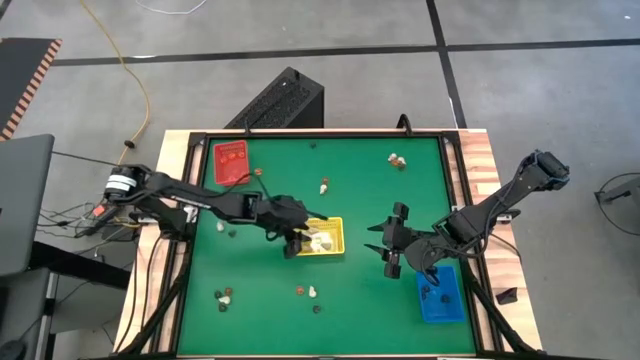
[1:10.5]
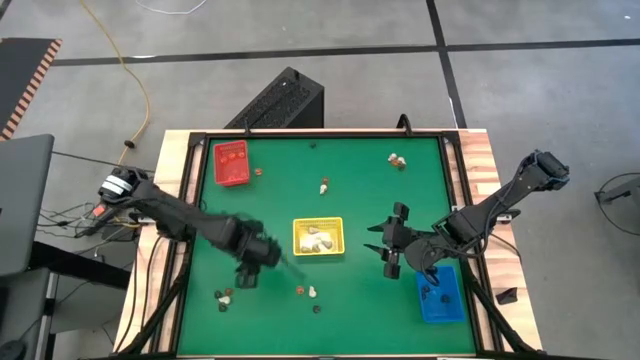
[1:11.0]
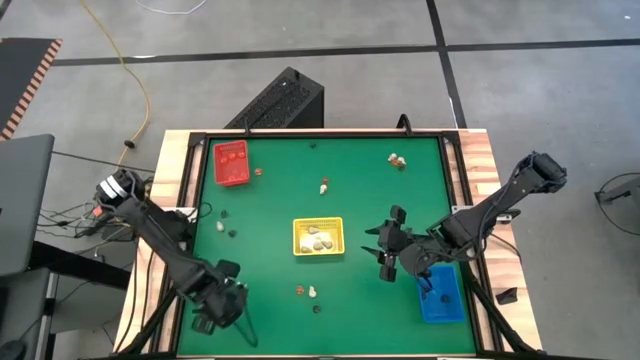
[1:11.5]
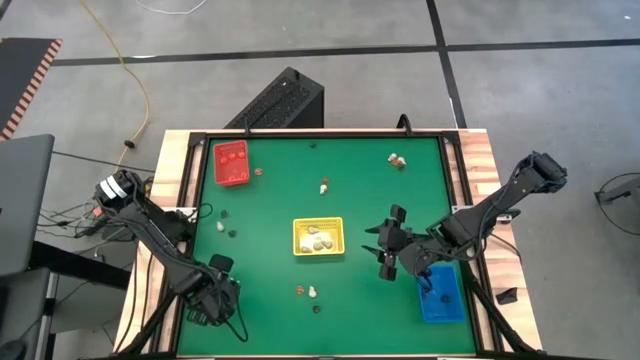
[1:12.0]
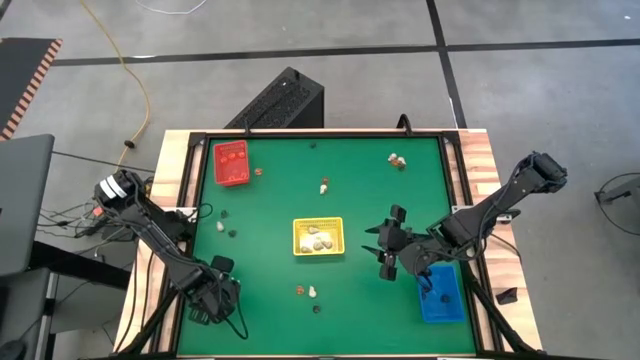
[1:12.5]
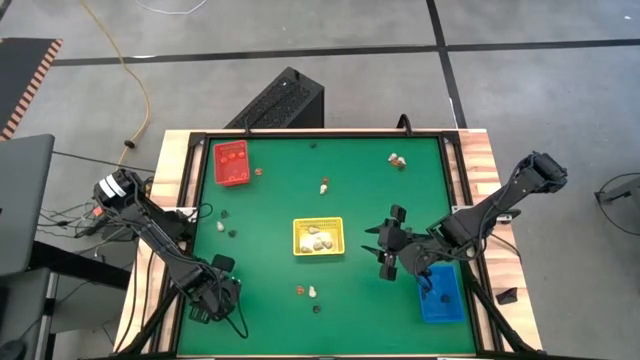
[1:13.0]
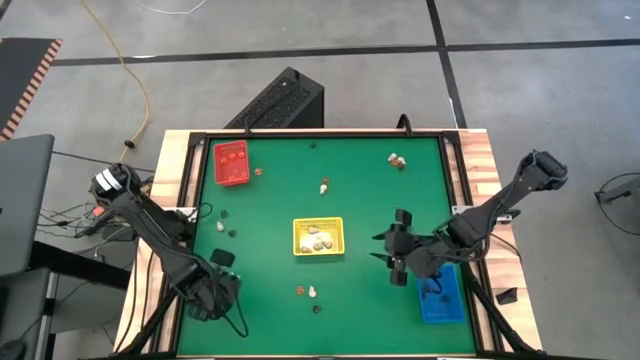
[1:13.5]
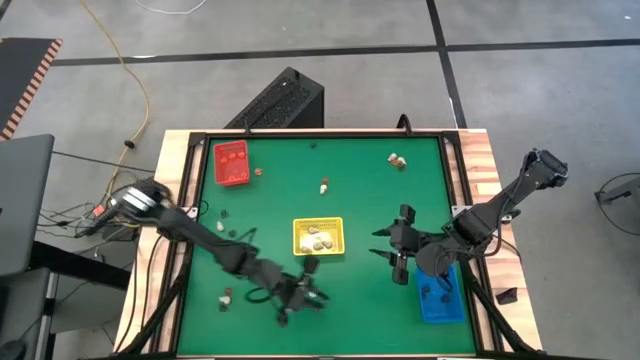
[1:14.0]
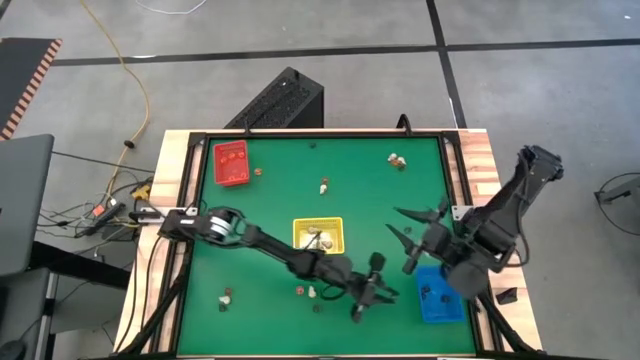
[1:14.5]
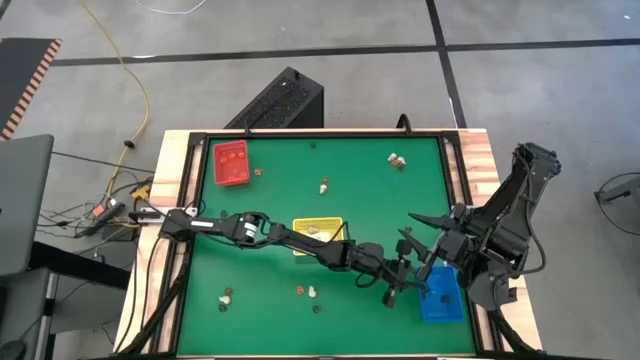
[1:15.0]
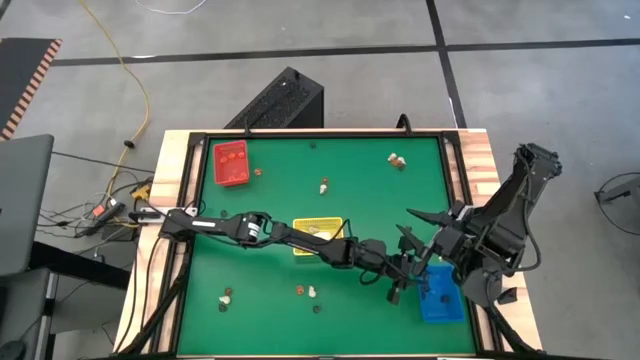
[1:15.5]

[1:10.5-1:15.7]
Task: Sort Halloween decoration
Put the black skull toy into the blue bin

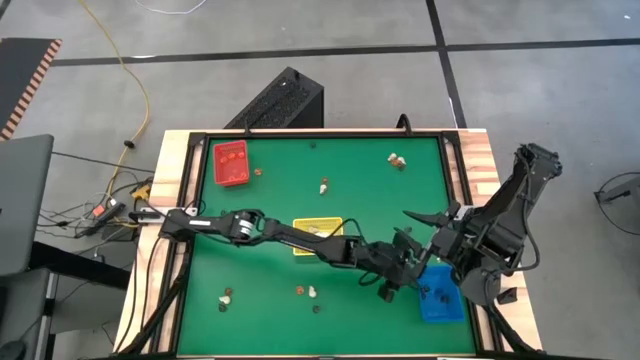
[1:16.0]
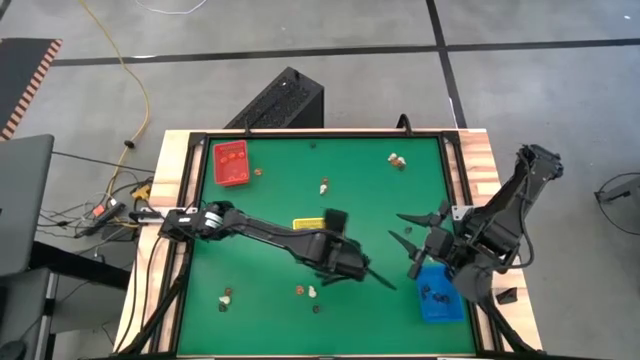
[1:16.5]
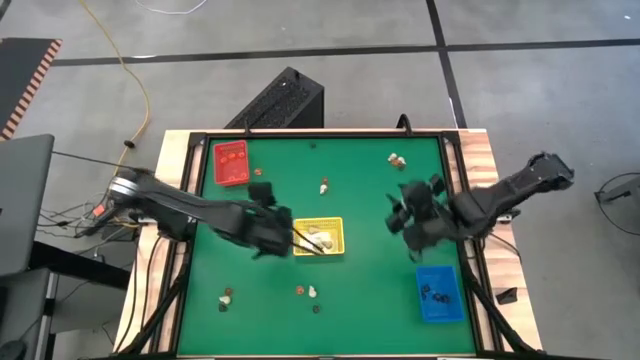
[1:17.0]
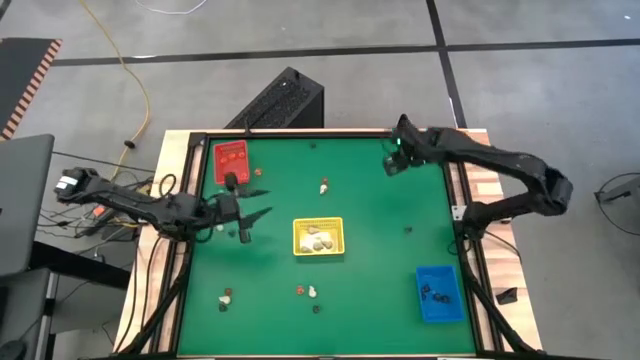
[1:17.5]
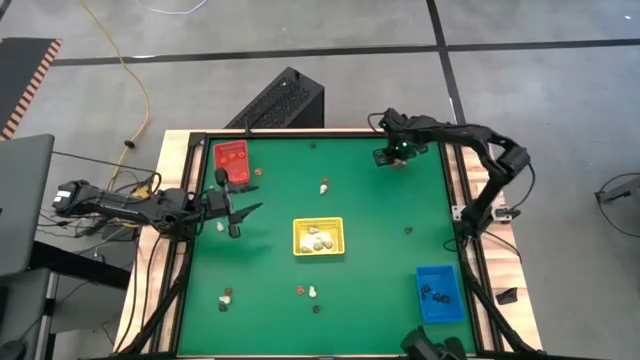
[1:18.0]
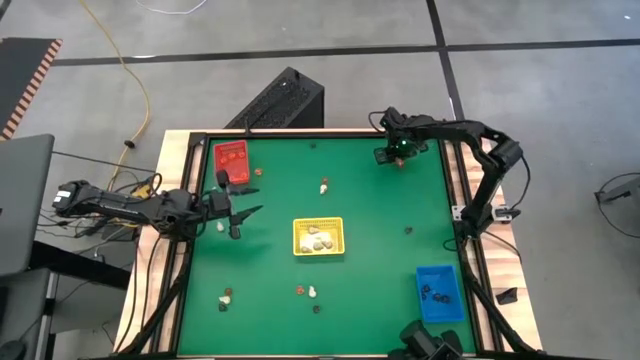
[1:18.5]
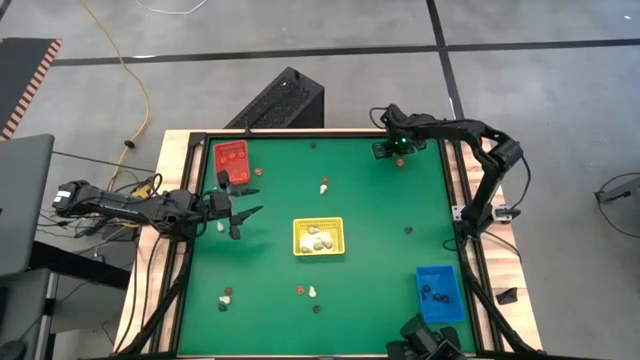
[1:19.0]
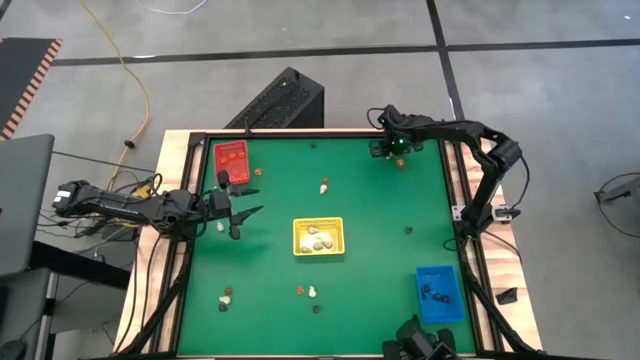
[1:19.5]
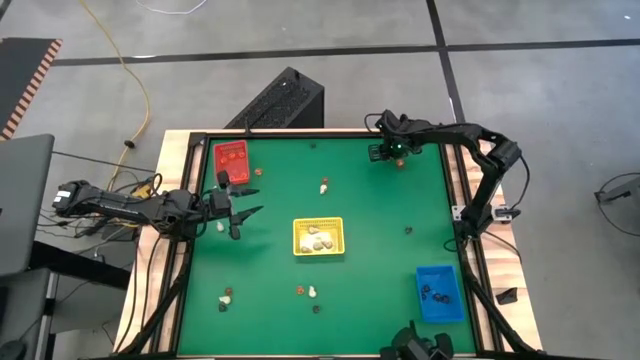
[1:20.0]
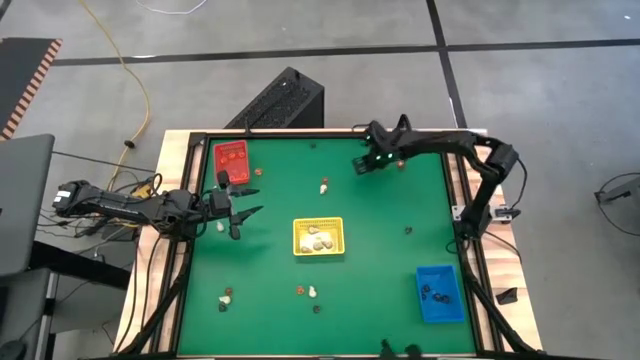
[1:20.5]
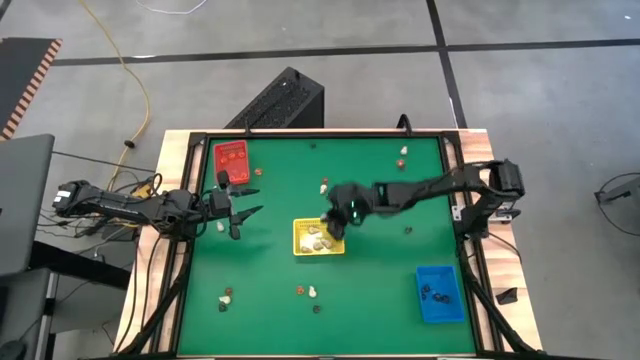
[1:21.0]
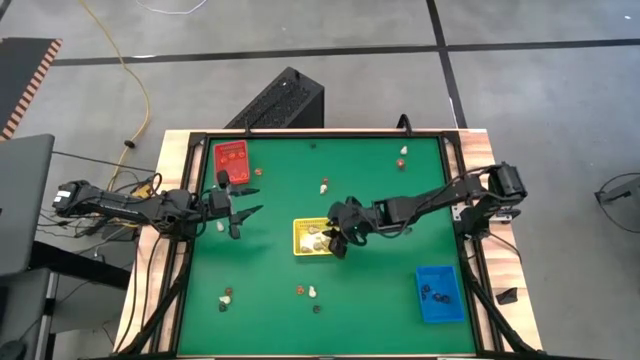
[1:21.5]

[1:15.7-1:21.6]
Put the white skull toy into the yellow bin

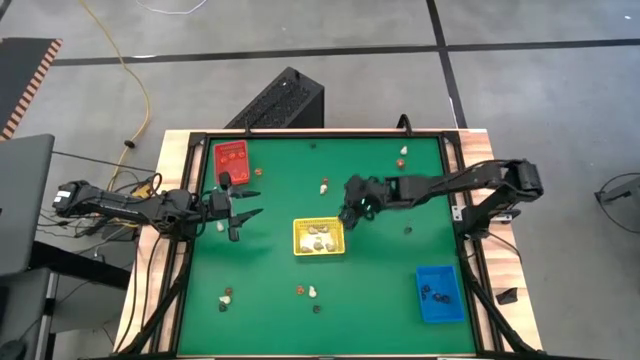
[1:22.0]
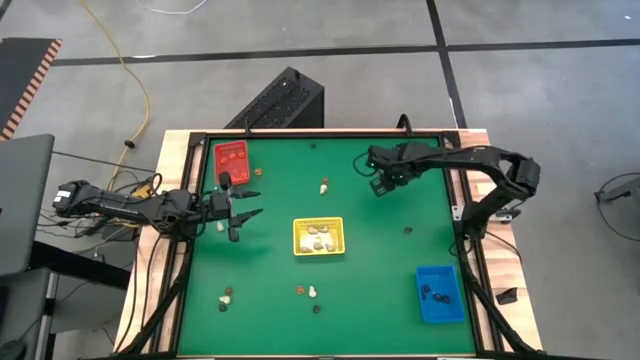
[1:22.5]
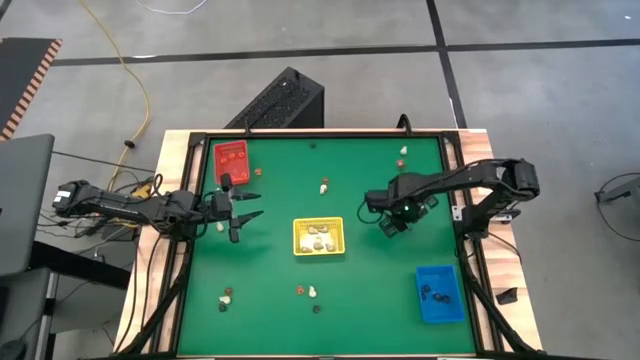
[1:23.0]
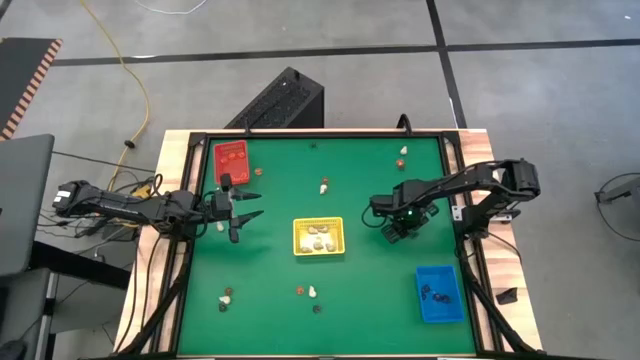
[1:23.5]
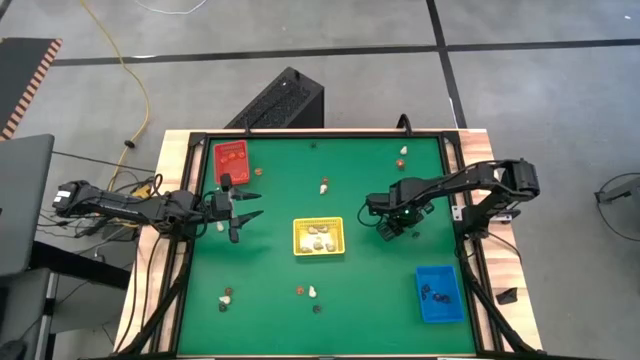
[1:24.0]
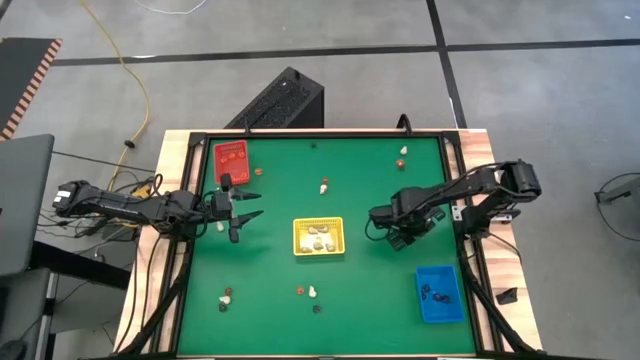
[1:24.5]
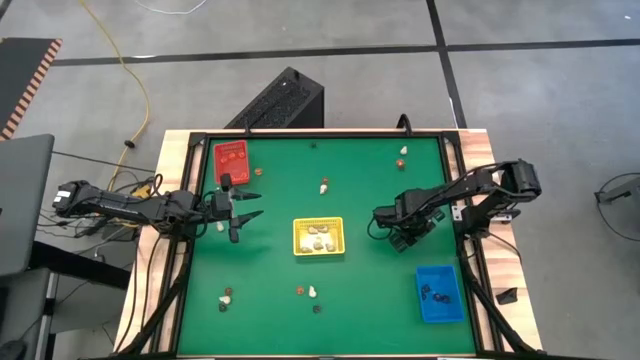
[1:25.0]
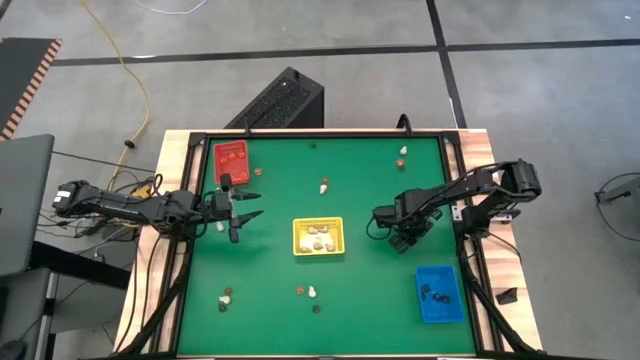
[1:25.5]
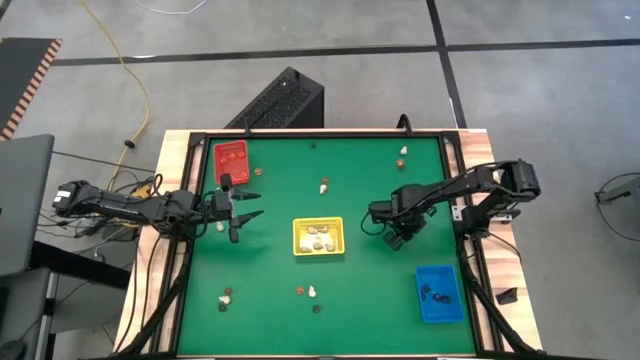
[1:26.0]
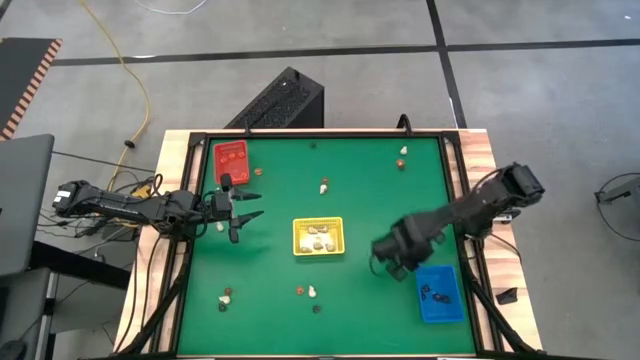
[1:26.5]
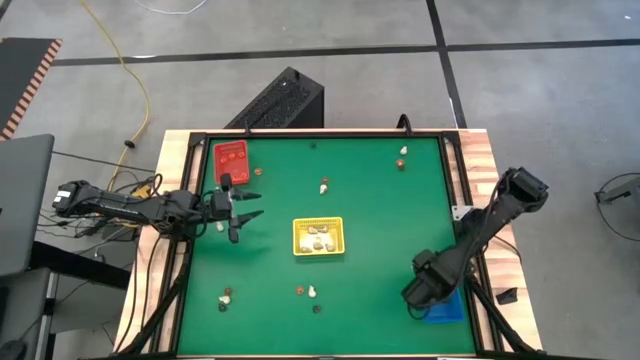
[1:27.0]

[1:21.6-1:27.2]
Put the black skull toy into the blue bin

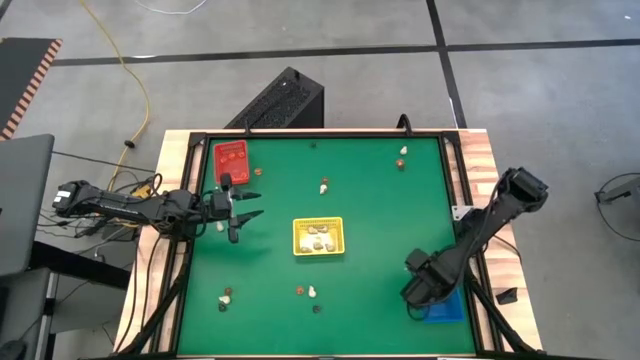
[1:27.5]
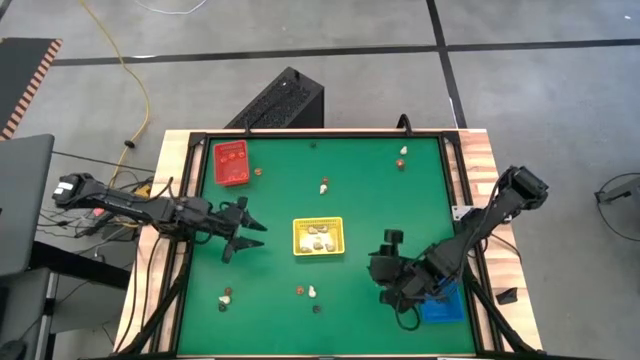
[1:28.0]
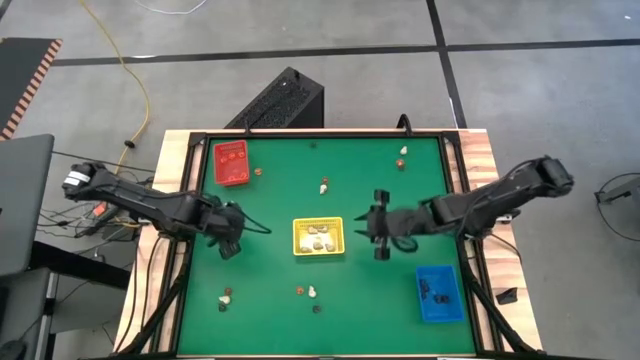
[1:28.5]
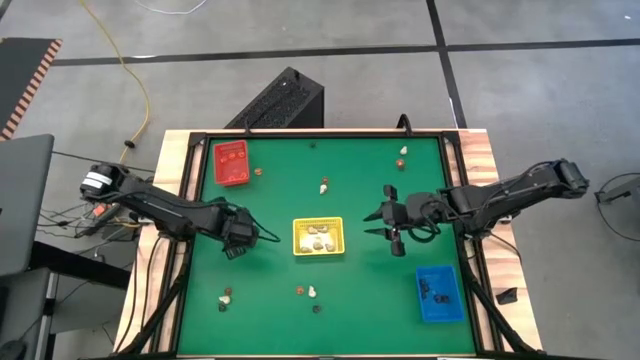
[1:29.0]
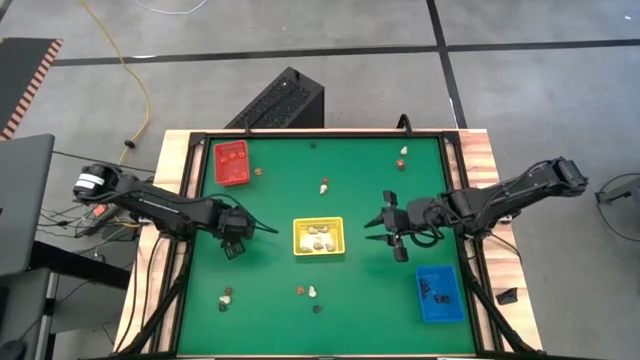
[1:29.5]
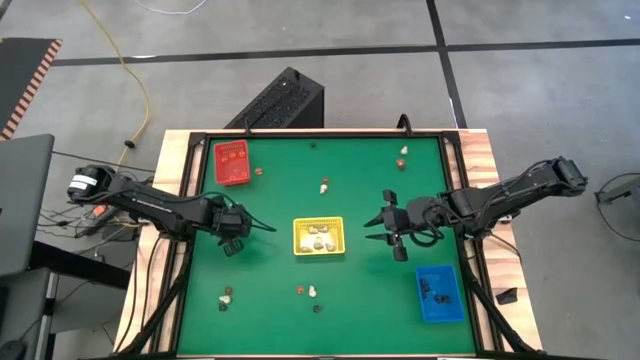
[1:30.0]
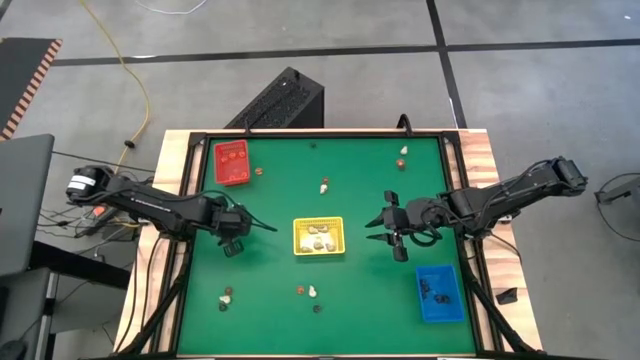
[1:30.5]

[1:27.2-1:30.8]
Put the black skull toy into the blue bin

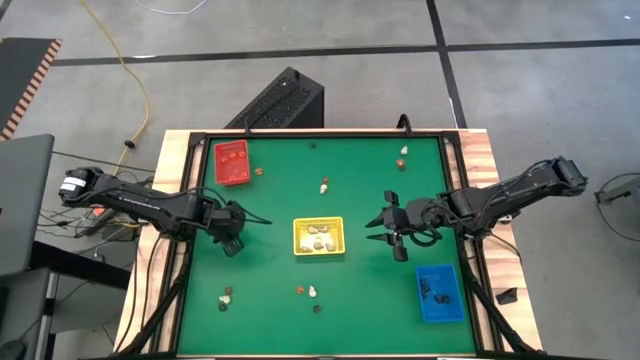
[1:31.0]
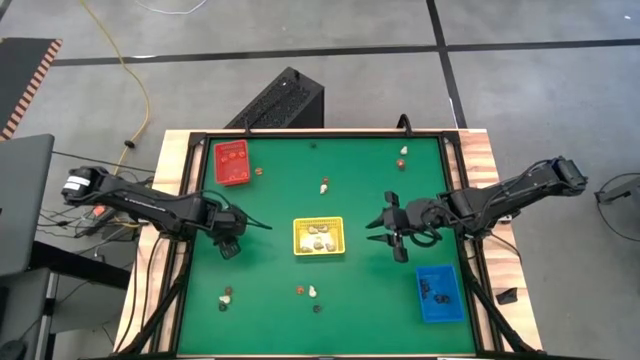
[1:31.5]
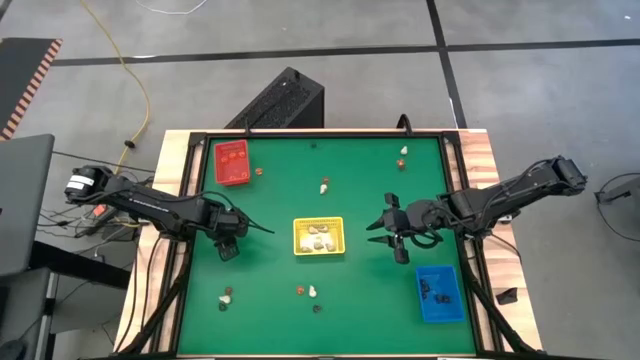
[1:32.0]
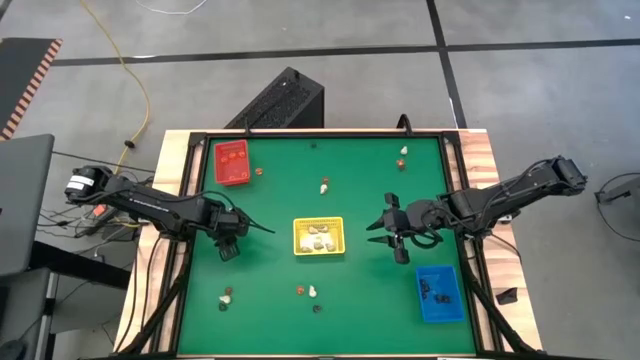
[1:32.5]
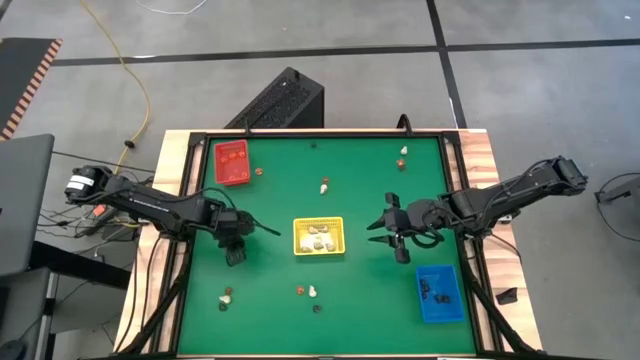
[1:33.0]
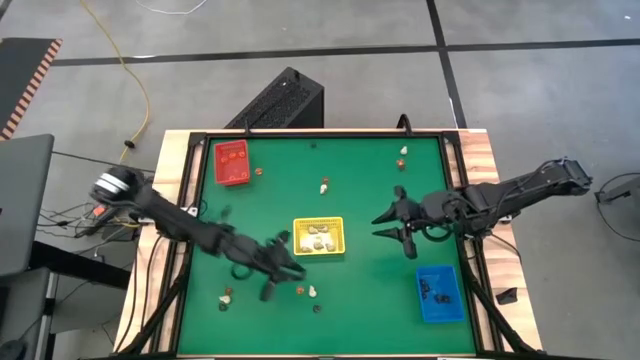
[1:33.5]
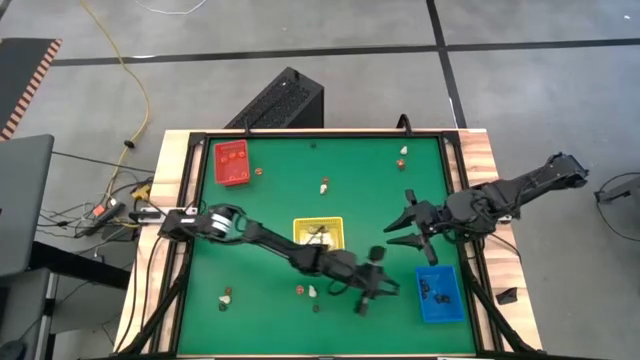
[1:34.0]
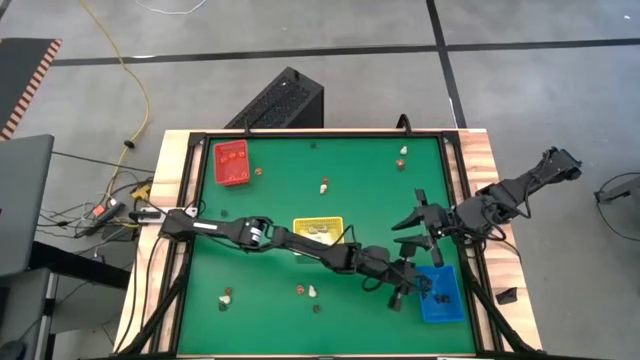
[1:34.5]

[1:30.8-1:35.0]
Put the black skull toy into the blue bin
